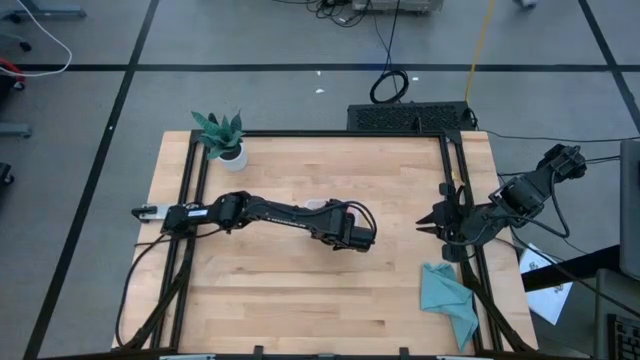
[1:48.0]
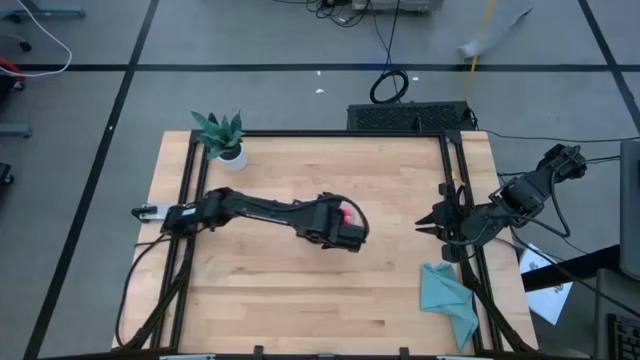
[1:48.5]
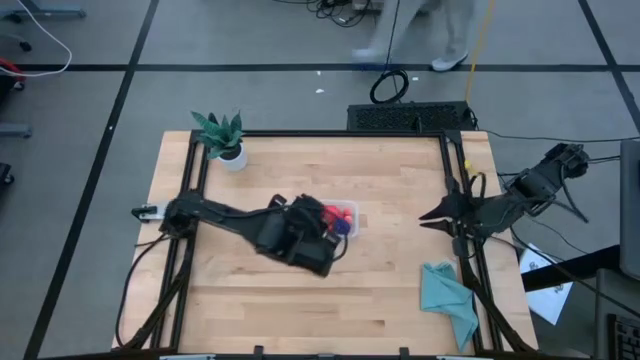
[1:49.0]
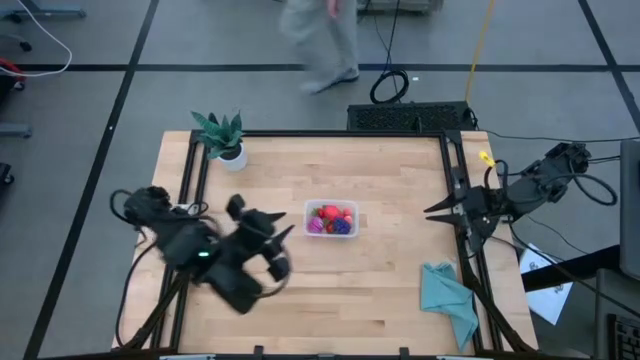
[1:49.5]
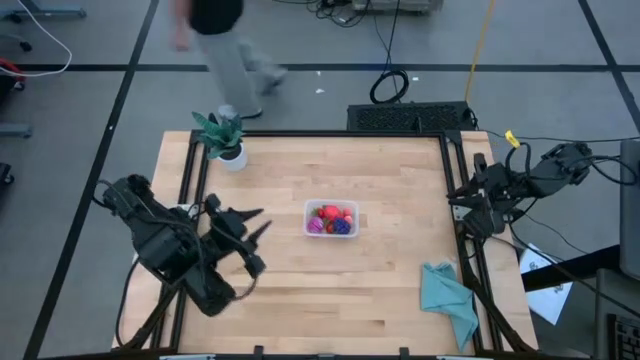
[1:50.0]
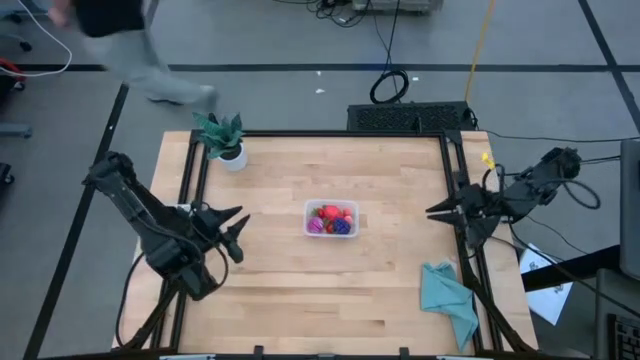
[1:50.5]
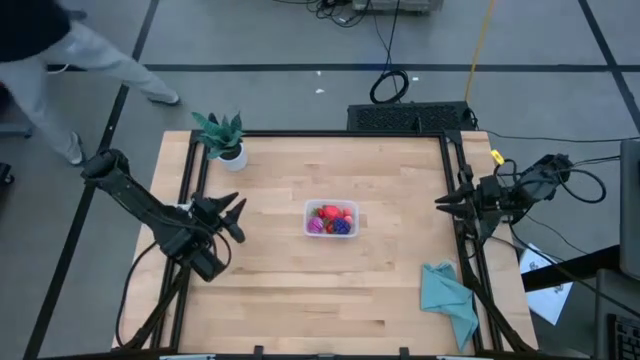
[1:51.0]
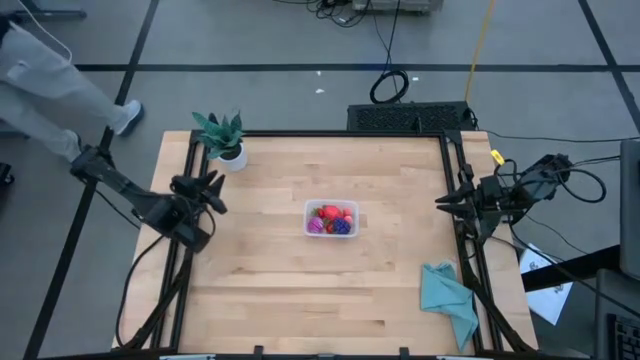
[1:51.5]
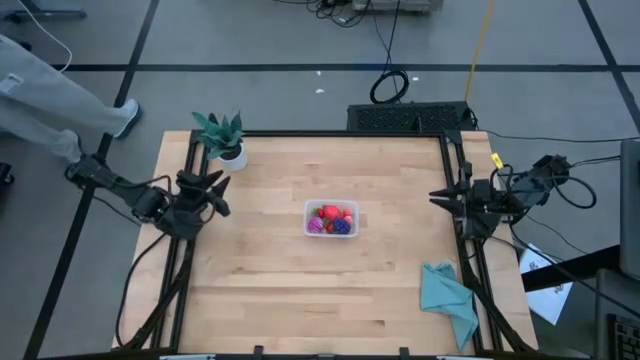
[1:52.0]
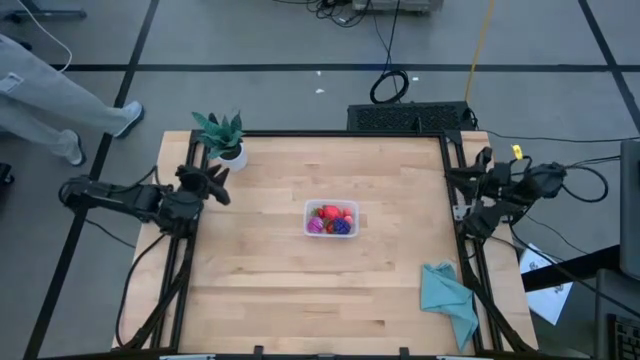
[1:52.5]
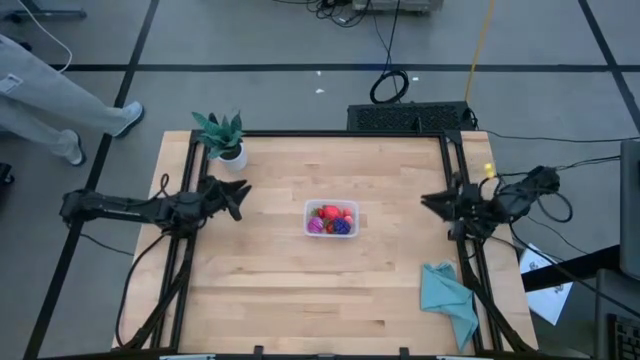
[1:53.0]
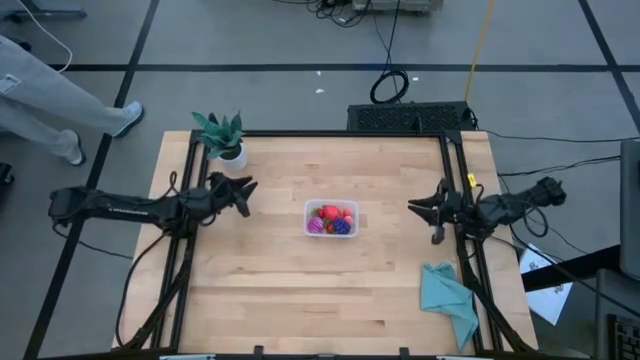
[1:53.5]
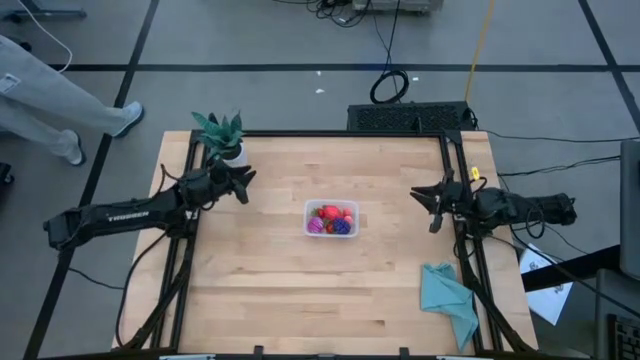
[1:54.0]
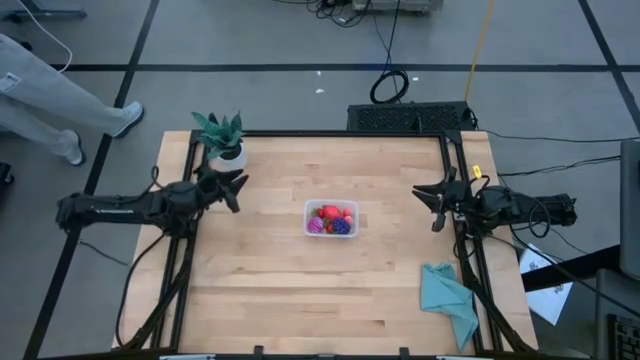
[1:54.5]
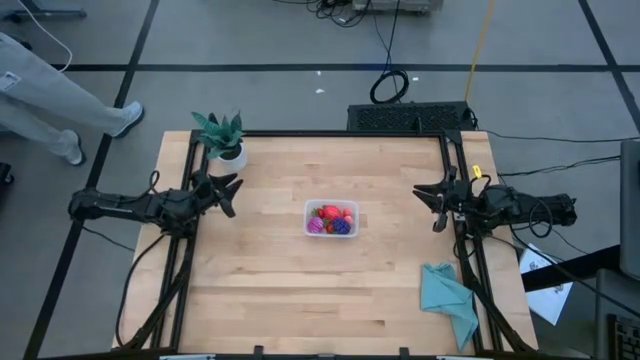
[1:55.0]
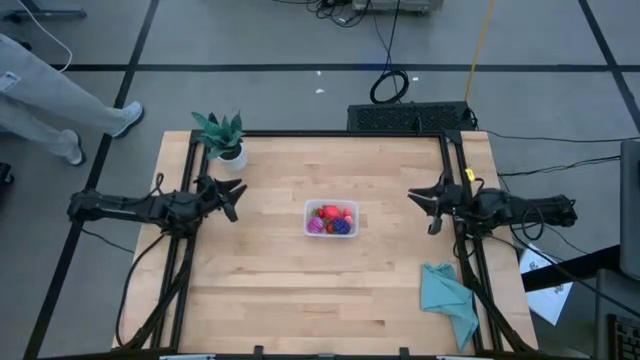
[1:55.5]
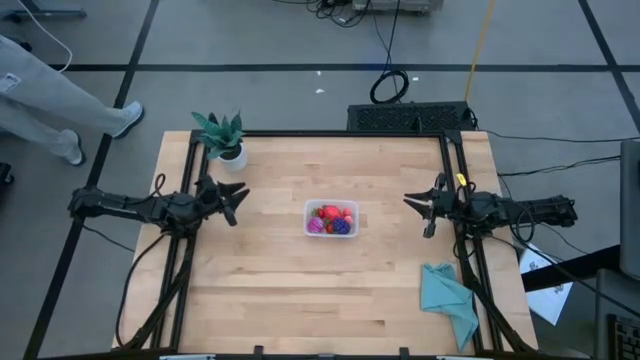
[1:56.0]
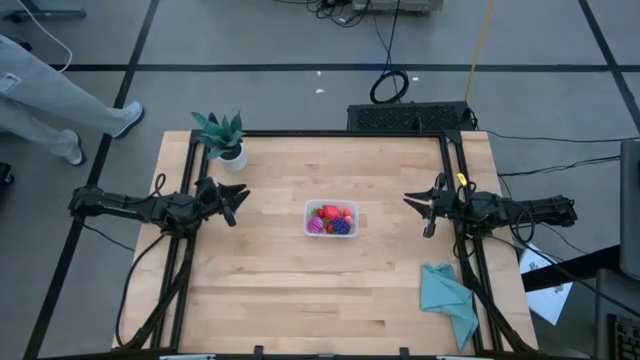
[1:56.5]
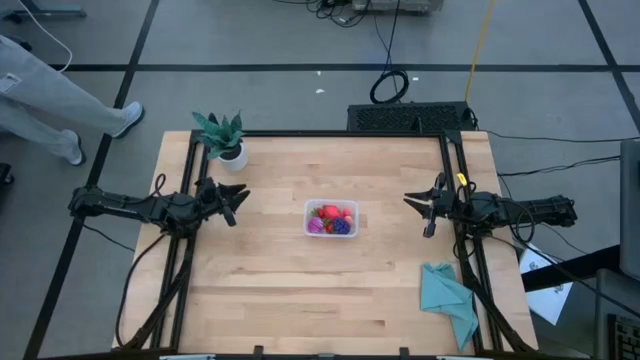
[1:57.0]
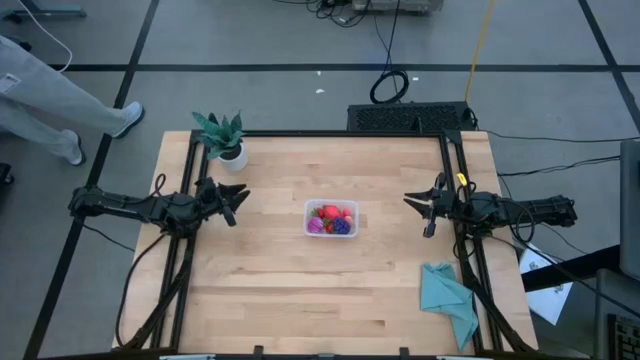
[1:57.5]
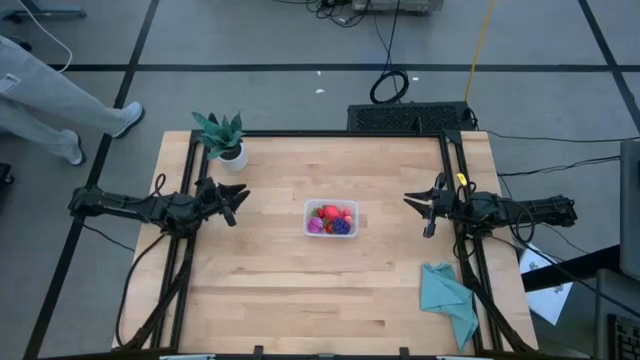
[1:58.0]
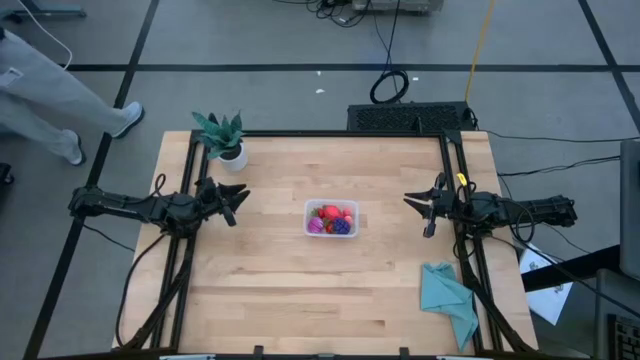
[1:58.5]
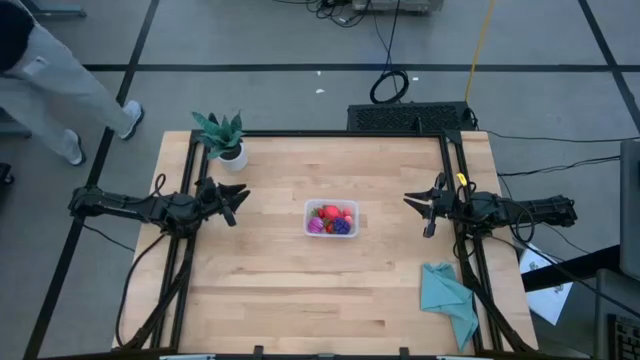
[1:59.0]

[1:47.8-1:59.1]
Task: Pick and placing Produce into tupperware
Return to Home Position

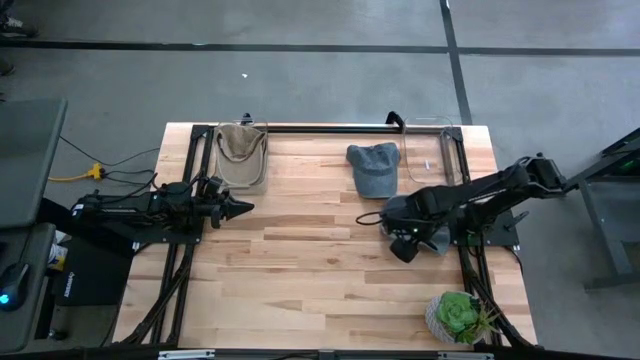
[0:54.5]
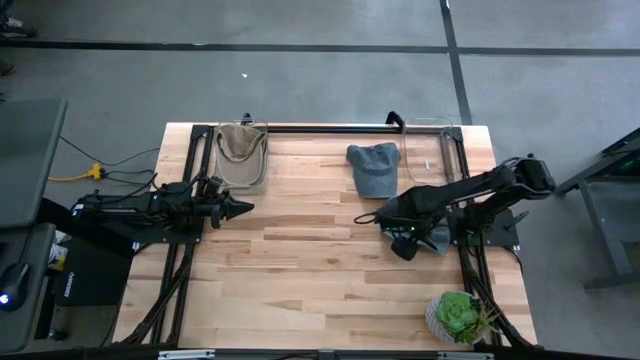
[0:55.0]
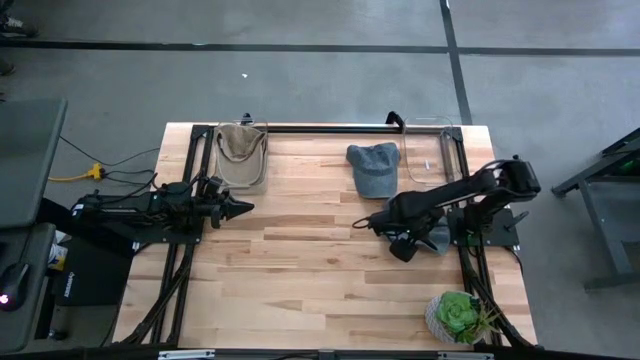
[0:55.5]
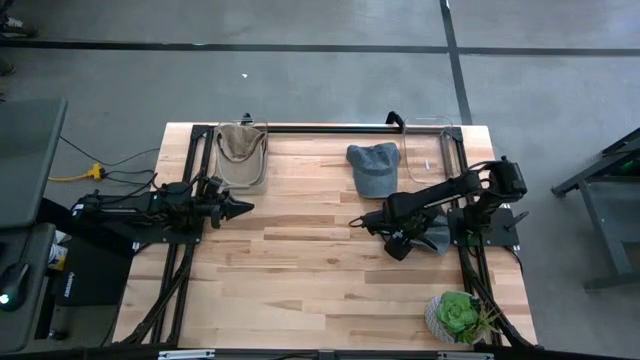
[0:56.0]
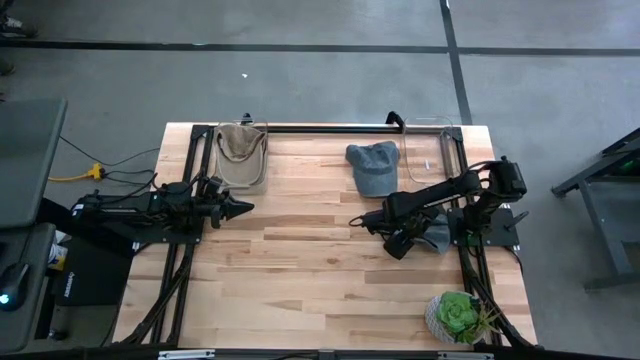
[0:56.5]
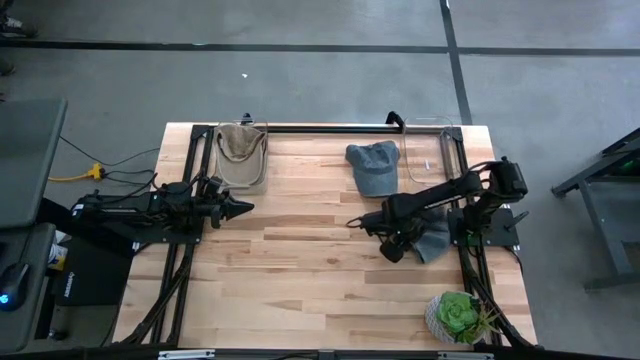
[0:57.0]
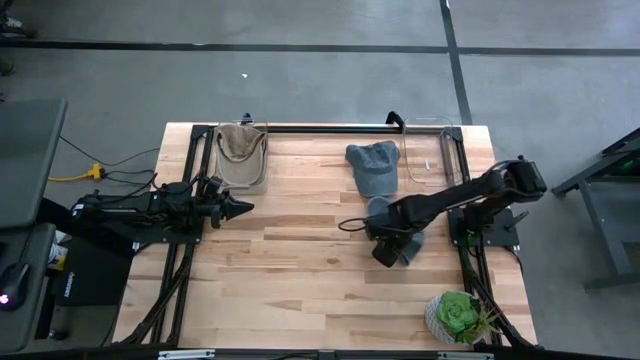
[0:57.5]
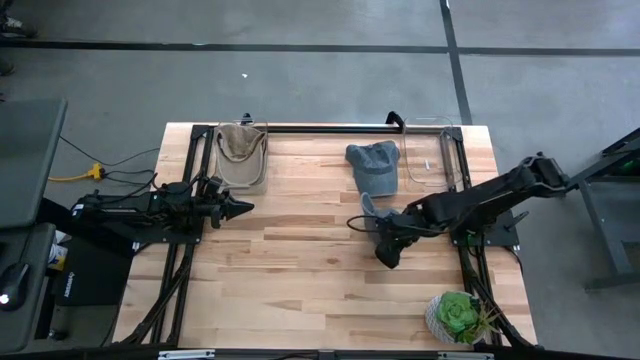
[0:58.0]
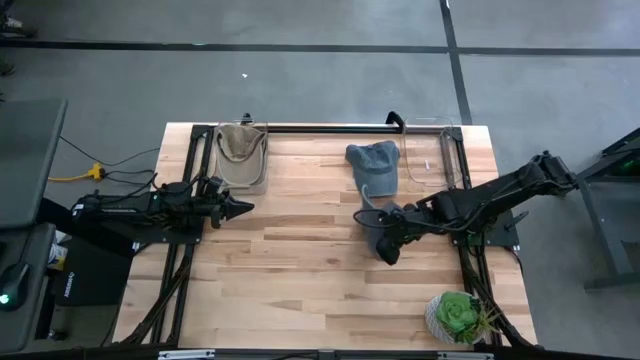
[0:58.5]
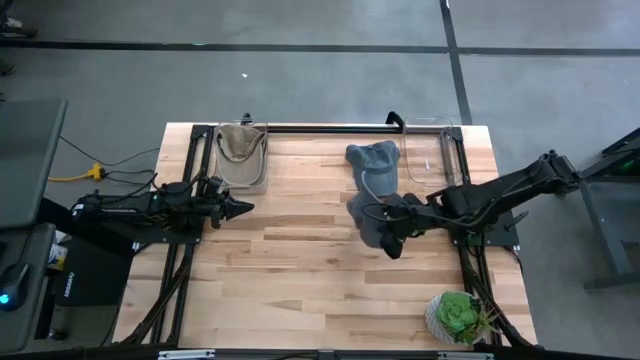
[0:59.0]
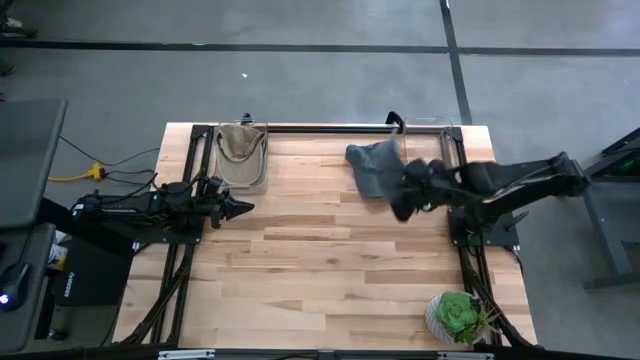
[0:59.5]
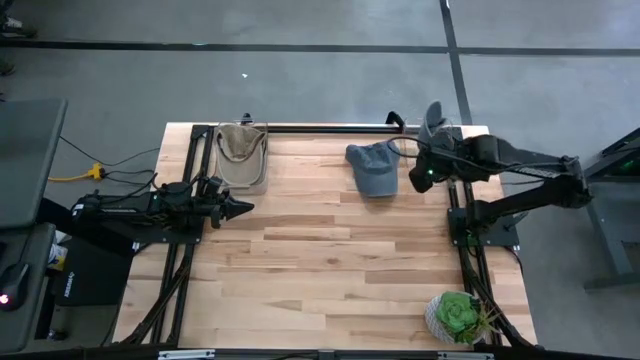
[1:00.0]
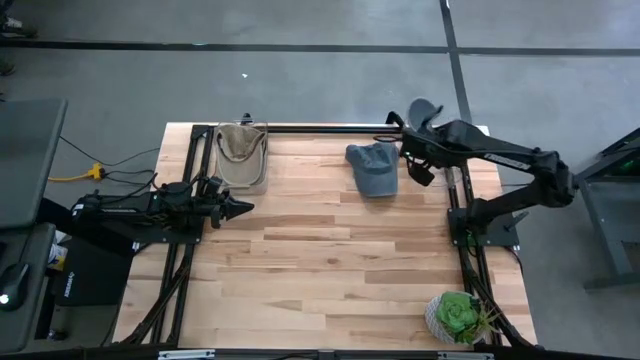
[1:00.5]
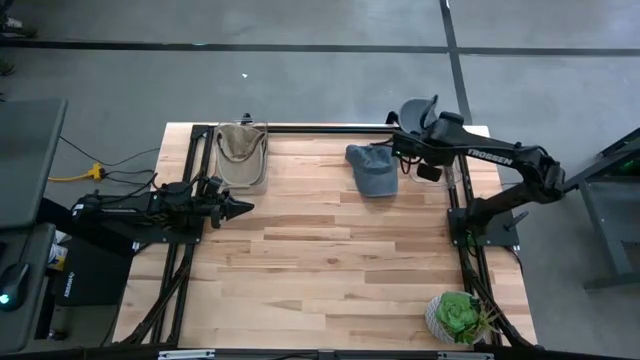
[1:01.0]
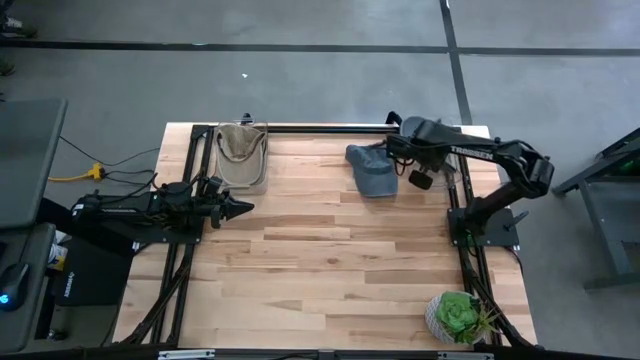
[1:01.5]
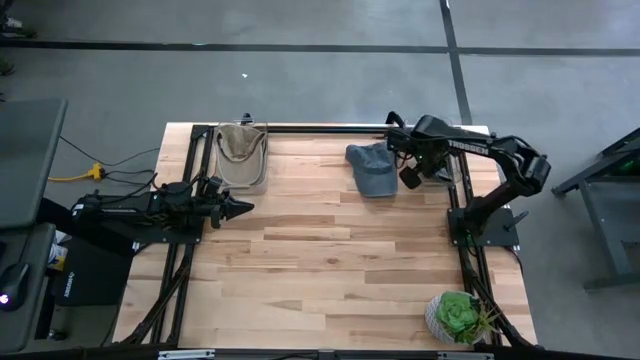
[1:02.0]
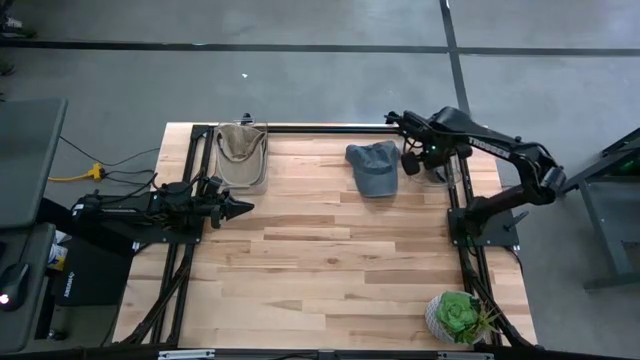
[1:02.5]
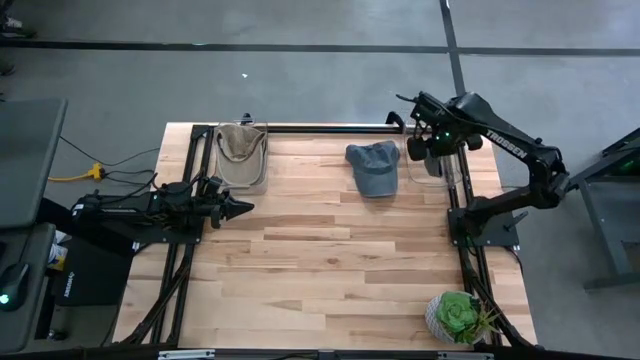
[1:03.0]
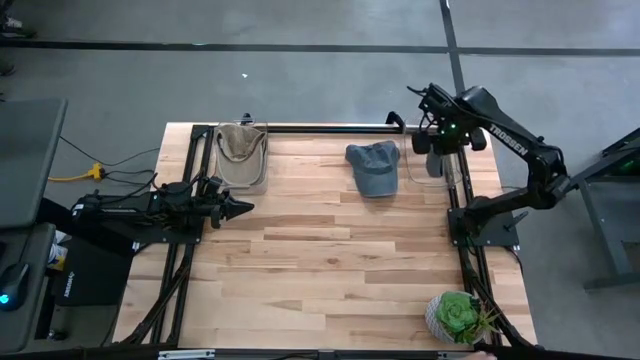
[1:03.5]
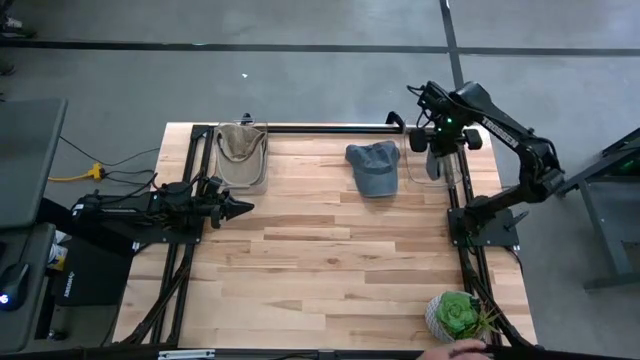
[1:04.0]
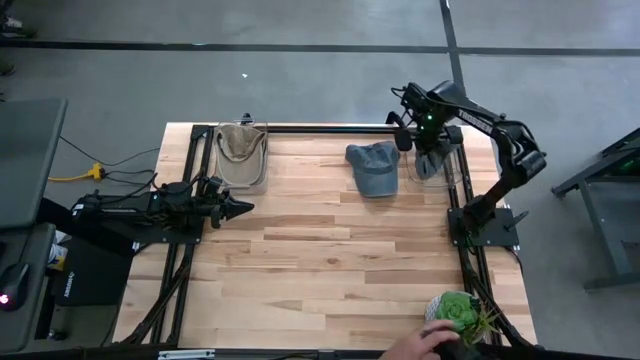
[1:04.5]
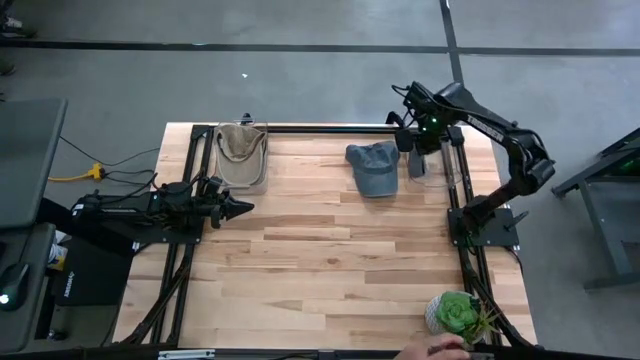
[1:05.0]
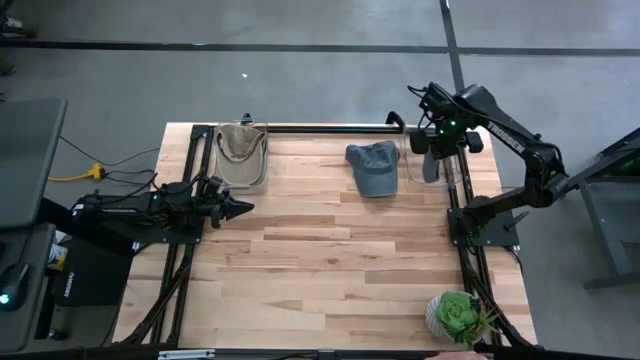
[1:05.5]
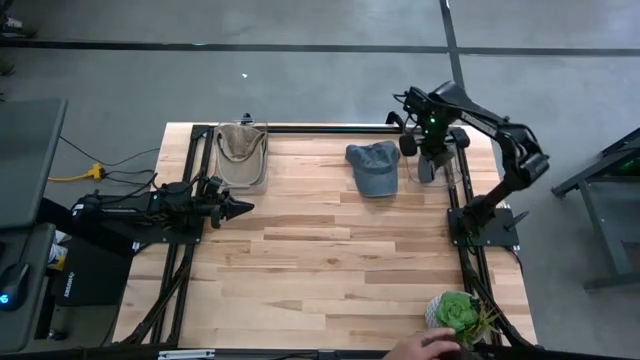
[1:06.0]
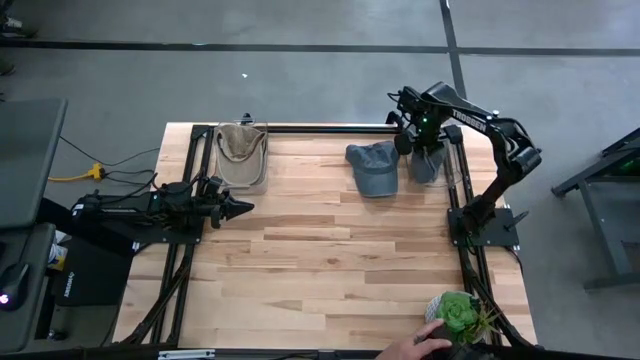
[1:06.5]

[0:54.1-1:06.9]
Task: Pick & Place hat
Put the bottom blue cap into the right transparent bin
